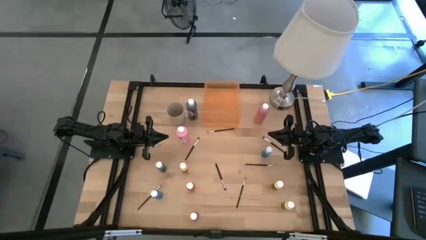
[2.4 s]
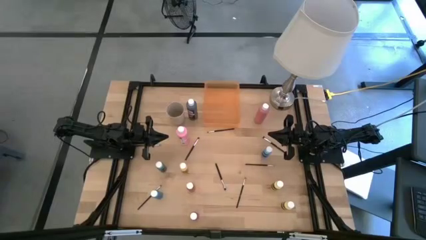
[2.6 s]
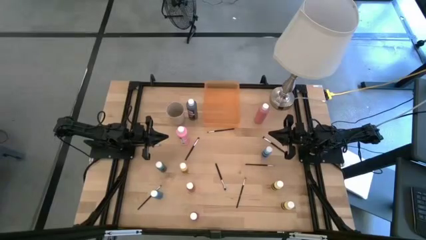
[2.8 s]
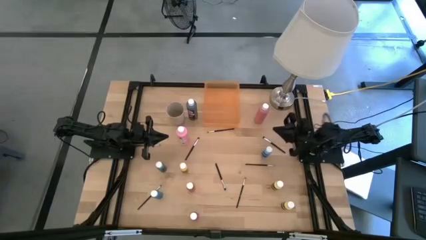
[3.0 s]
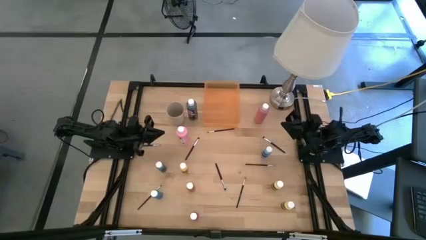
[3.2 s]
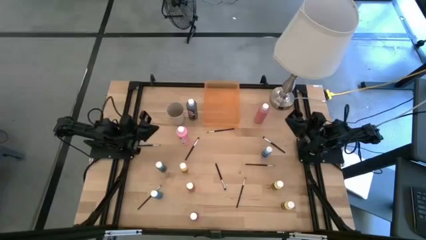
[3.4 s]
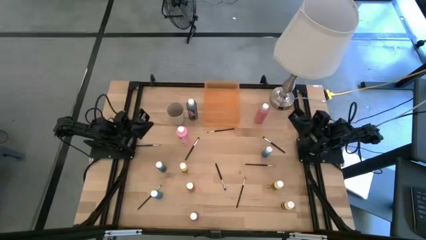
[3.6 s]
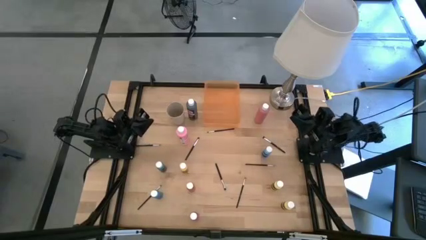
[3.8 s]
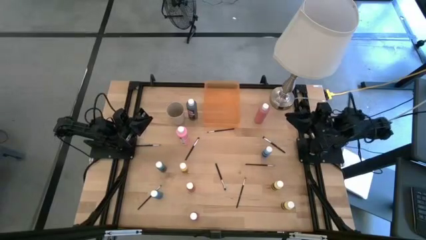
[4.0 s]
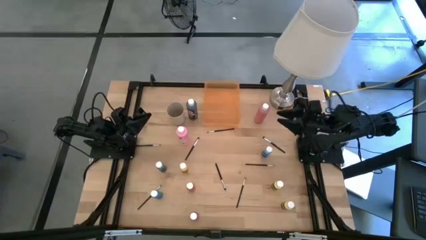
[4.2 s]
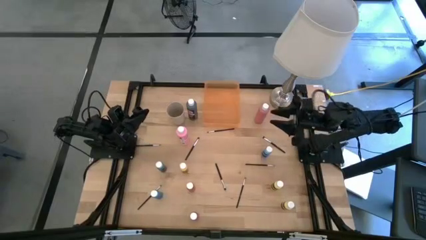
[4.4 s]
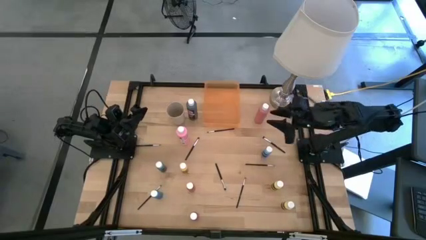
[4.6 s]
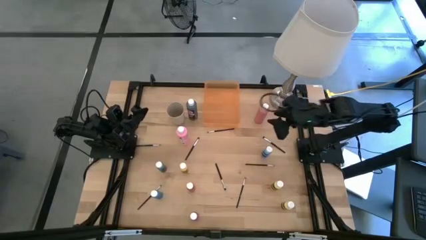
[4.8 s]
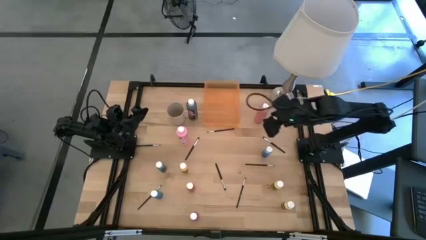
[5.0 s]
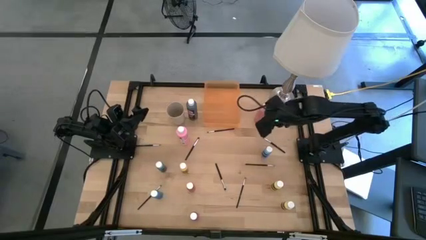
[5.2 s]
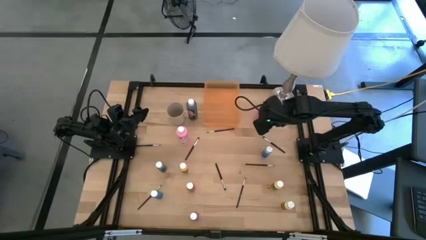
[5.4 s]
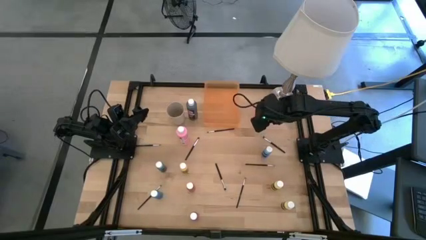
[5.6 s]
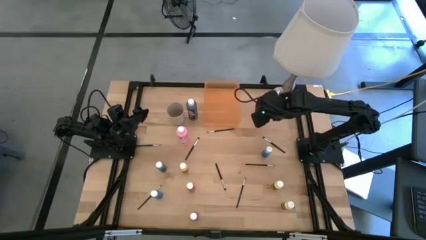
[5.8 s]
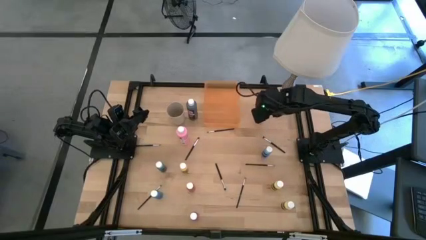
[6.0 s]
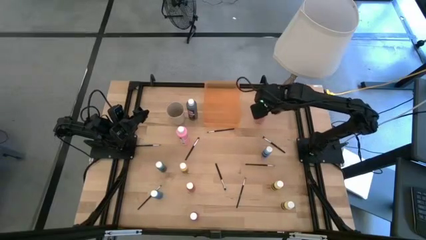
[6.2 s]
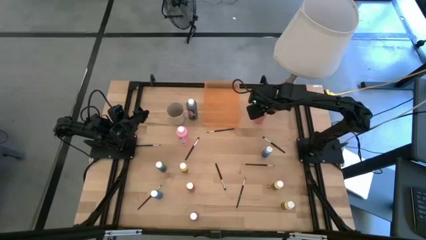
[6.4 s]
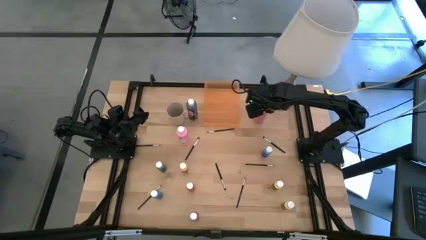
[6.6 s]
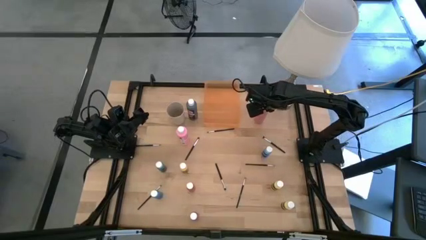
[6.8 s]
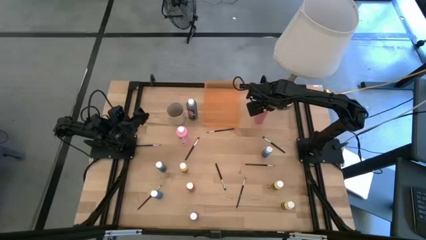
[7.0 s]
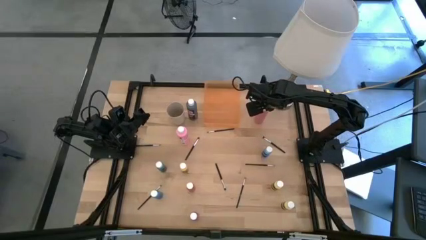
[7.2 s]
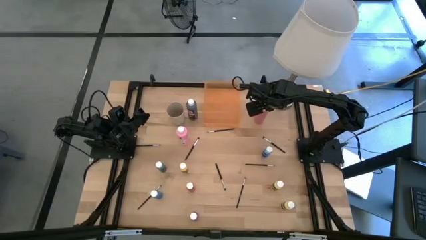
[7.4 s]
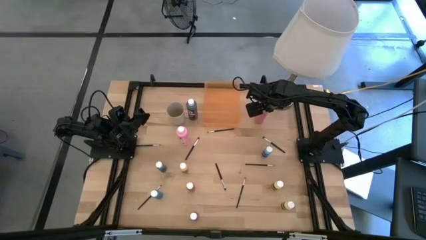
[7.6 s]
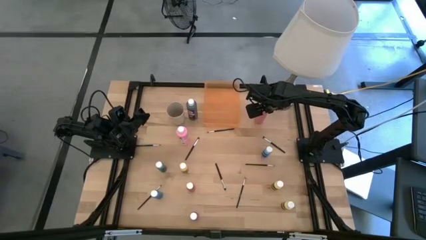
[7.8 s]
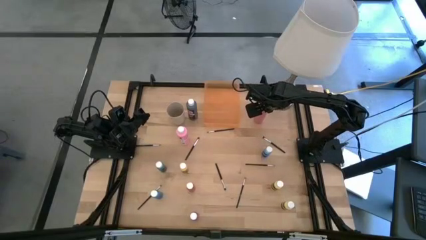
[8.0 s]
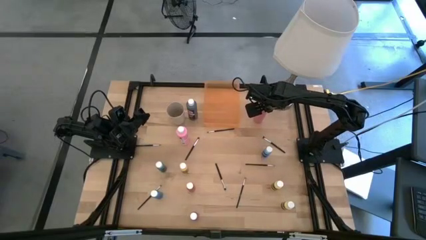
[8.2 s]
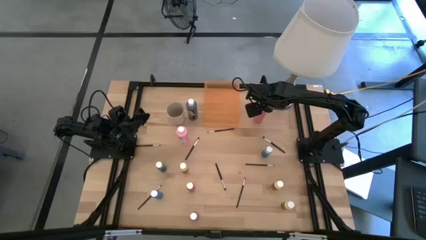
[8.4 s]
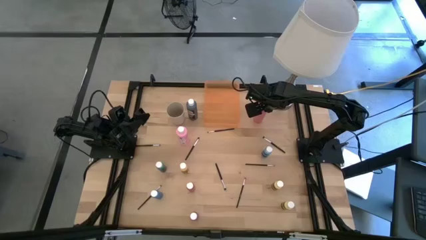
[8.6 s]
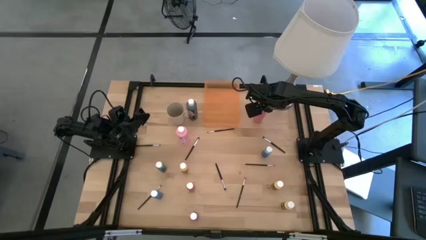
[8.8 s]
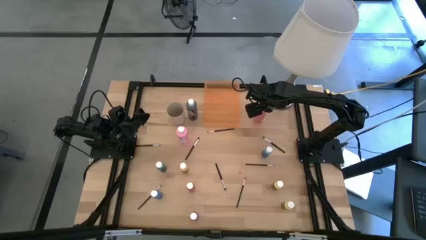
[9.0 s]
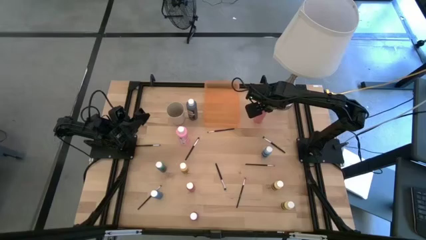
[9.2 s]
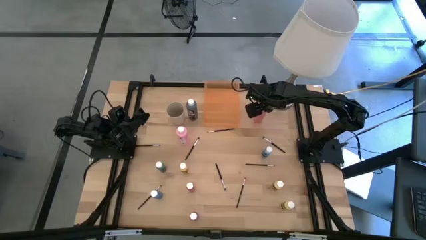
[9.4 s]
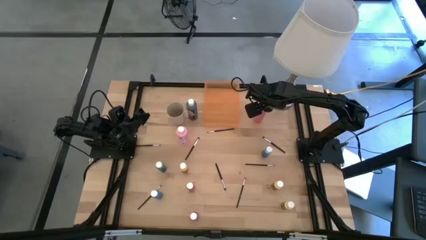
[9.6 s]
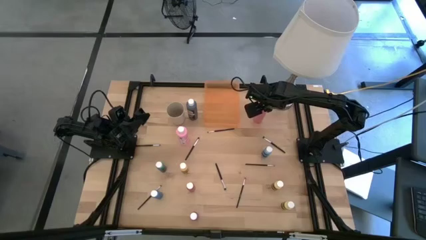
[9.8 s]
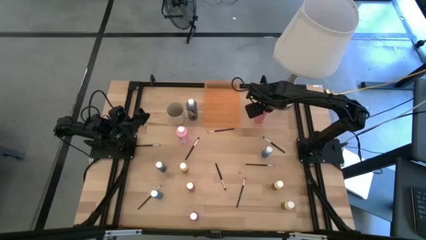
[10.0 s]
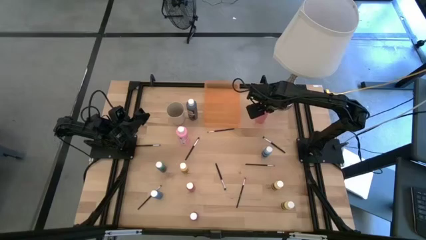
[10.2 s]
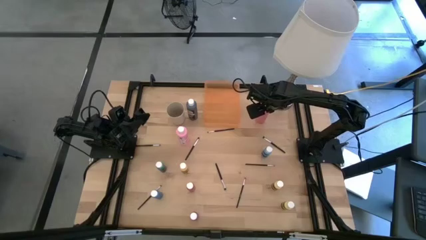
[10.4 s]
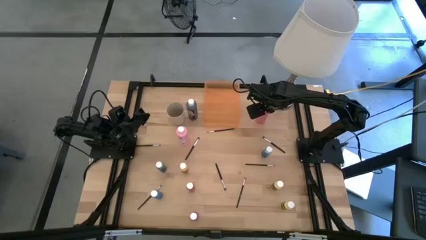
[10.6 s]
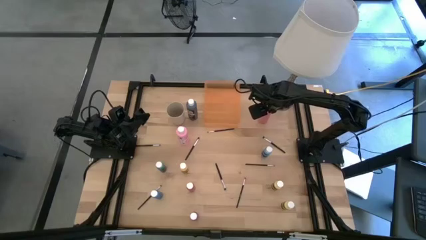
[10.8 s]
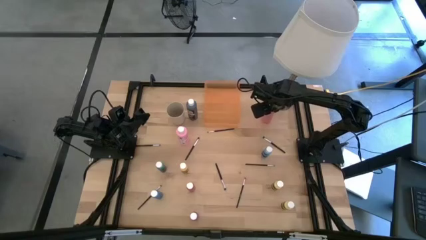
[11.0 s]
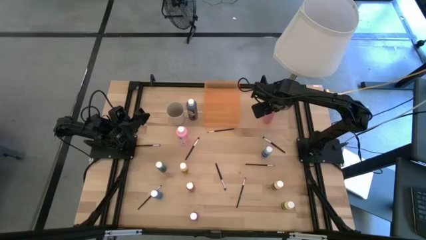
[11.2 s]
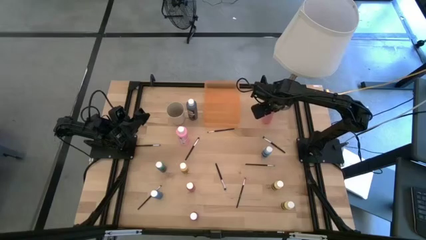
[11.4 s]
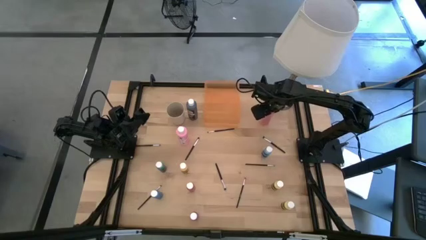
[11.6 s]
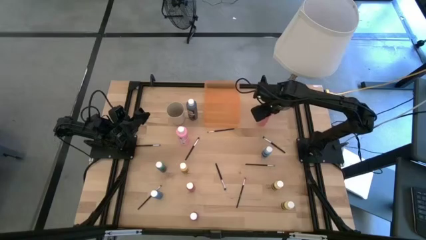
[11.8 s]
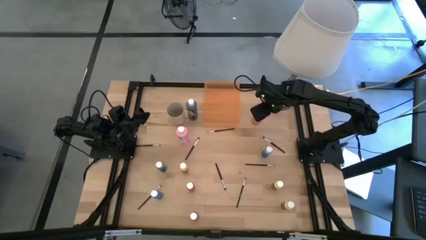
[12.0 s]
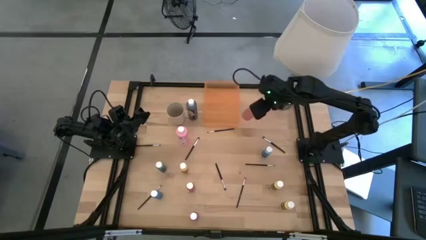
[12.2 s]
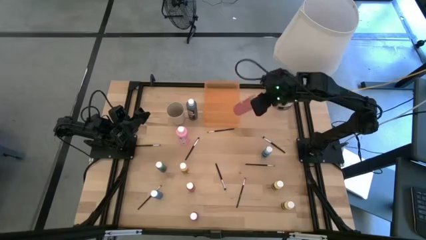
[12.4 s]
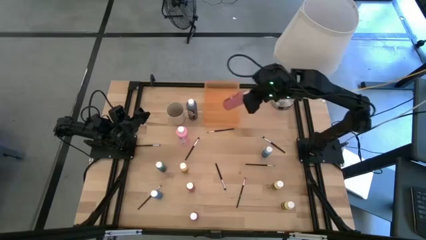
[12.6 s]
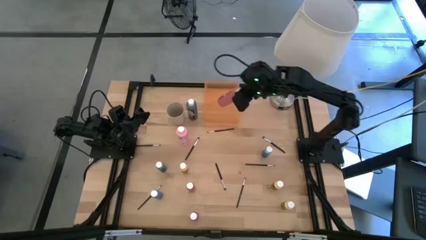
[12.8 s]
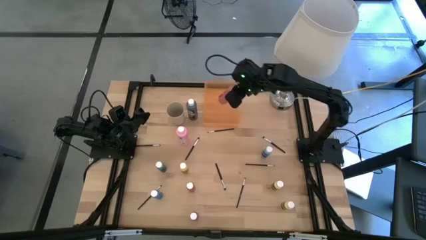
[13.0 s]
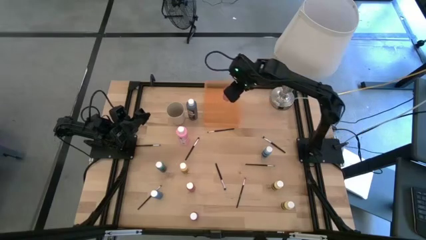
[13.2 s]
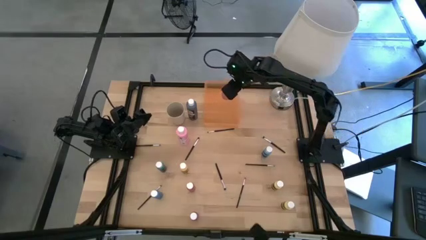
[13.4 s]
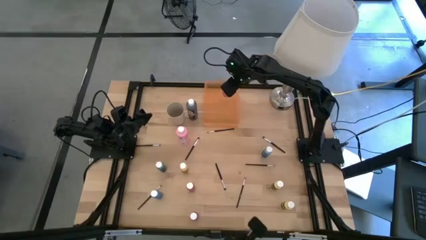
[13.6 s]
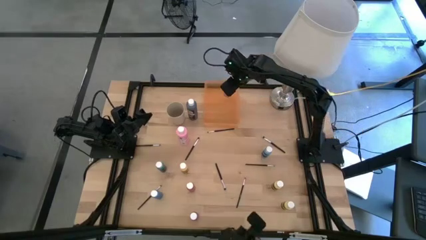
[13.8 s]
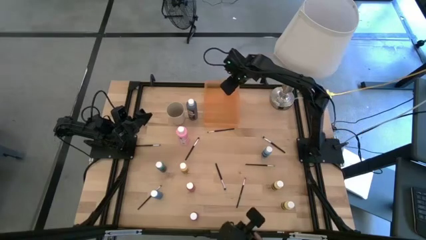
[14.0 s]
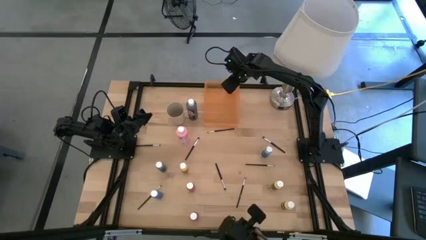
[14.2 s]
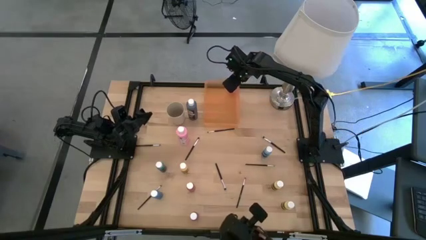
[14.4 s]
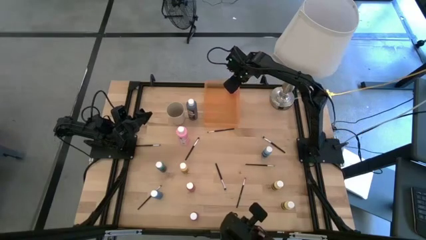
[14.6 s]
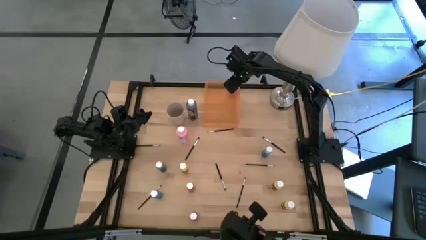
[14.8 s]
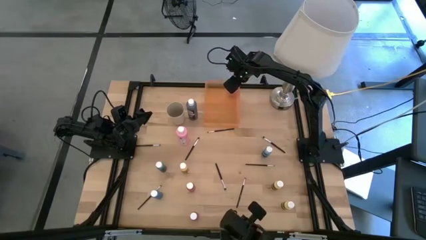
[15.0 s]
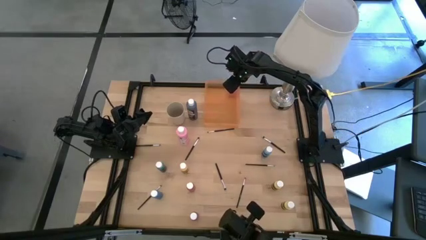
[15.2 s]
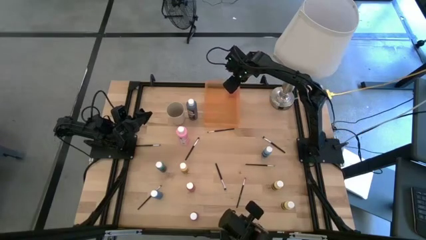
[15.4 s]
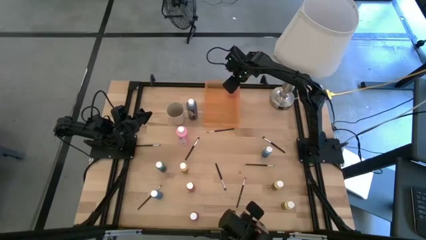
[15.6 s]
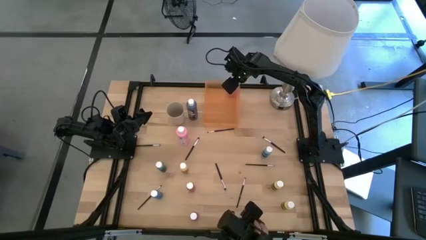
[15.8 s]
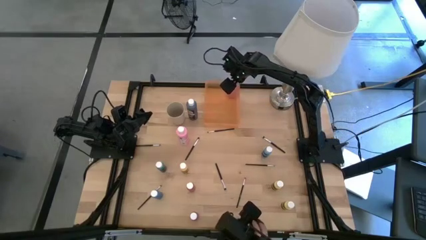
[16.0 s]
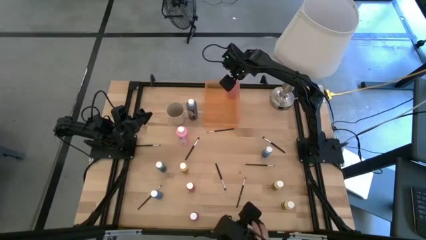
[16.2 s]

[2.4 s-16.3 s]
Task: Pick & Place Paint Supplies
Put the pink paint bottle into the orange bin

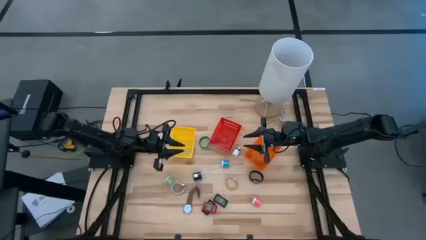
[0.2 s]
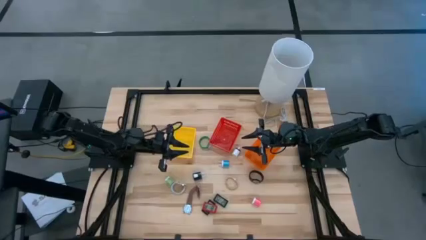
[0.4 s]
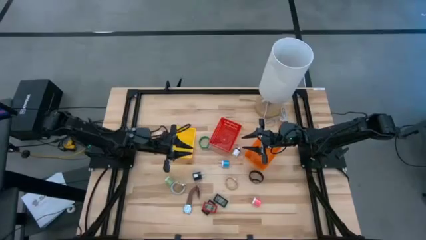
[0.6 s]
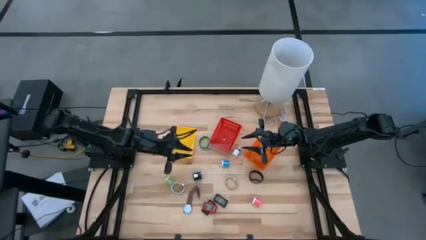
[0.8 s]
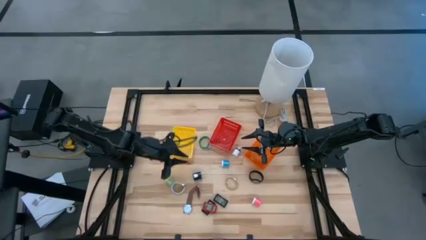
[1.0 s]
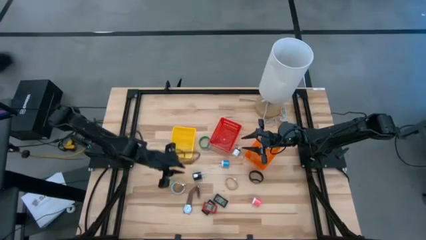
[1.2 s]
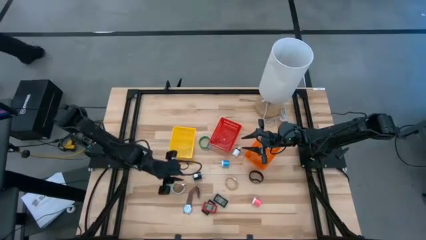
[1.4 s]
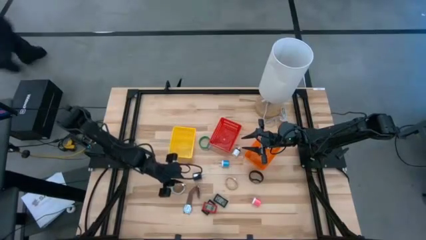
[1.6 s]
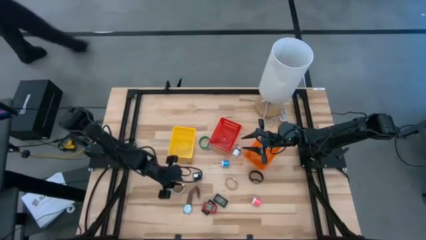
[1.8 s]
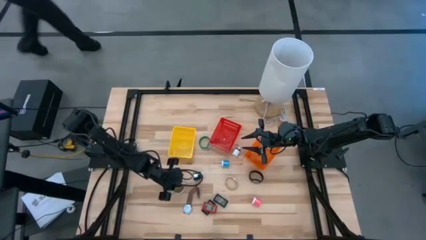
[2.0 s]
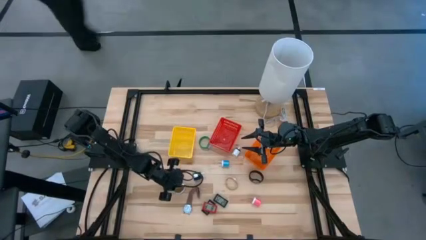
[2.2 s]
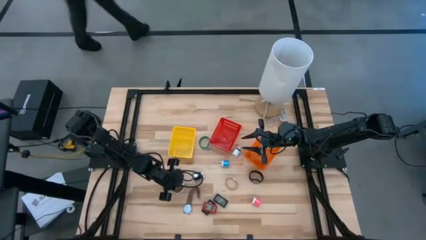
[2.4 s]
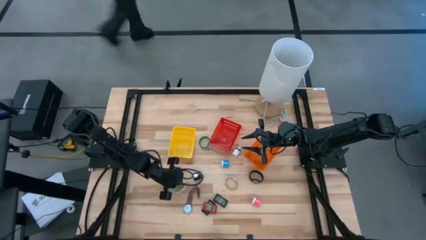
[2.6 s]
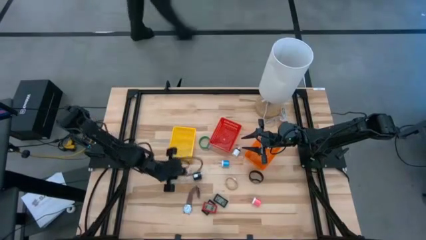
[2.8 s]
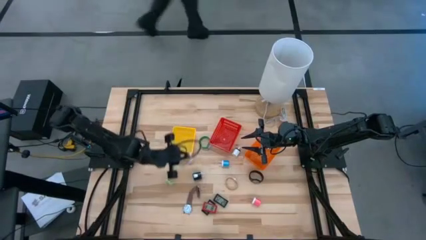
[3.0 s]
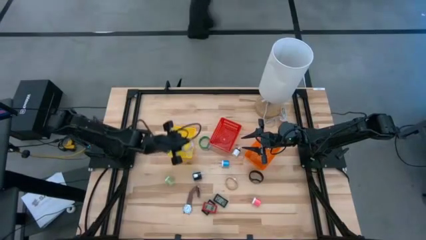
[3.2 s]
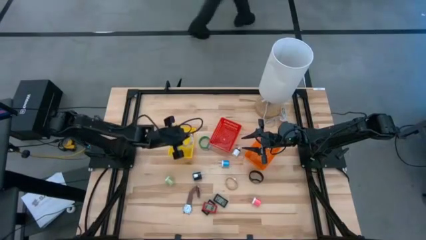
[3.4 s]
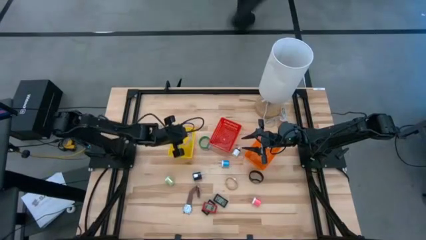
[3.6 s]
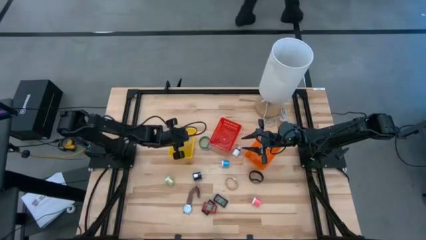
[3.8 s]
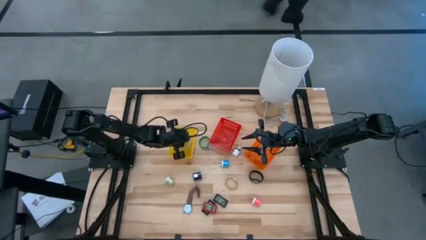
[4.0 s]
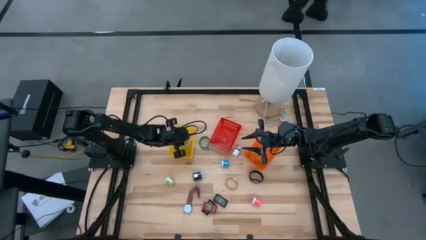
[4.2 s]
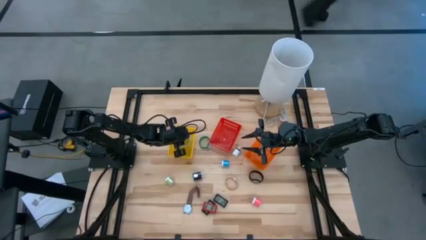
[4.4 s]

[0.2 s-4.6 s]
Task: Pick & Place Office items
Put the white watch into the yellow bin
